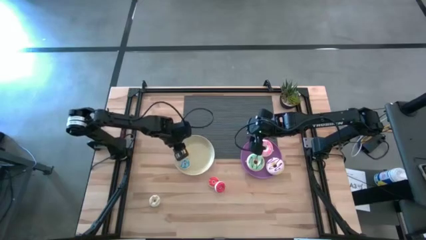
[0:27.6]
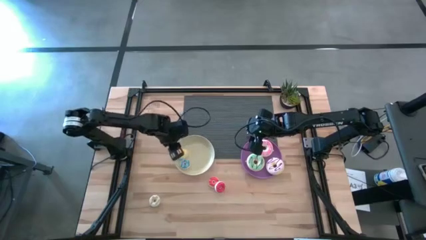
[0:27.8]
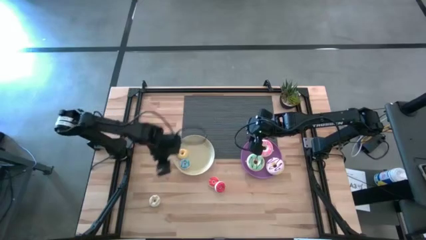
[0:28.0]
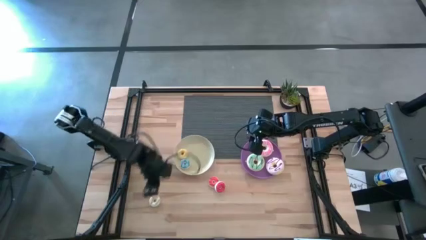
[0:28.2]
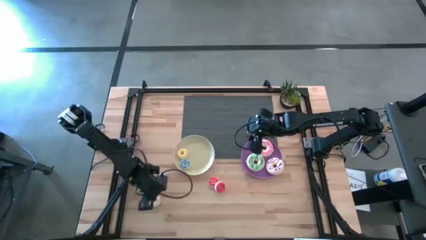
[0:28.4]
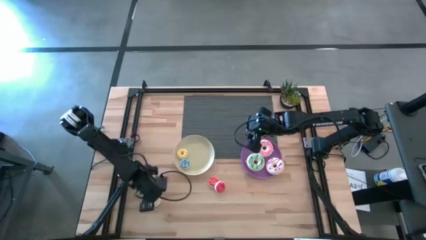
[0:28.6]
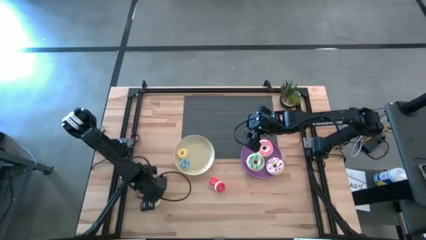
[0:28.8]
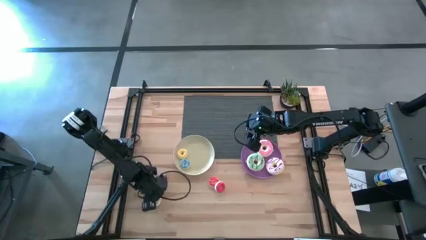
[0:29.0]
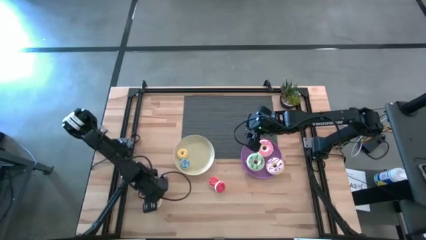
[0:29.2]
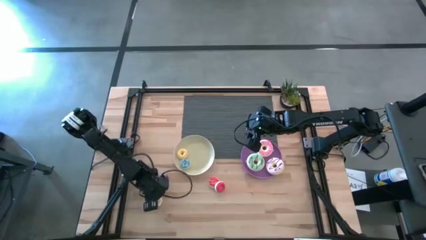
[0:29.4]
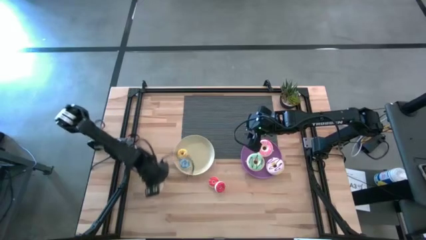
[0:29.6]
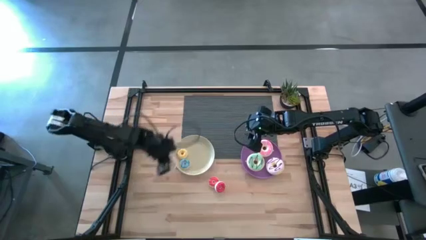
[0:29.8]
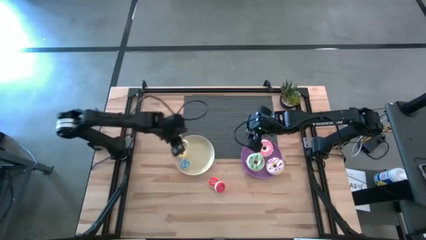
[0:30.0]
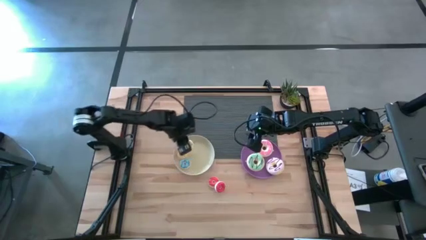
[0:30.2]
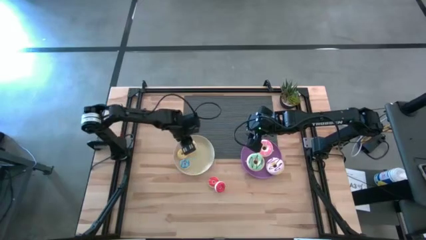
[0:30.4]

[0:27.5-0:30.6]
Task: Pick & Place donuts
Put the small white donut on the white plate

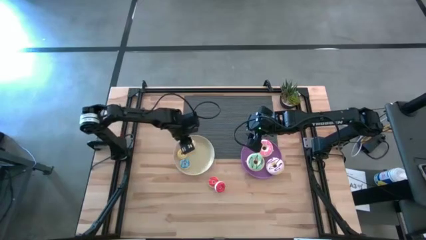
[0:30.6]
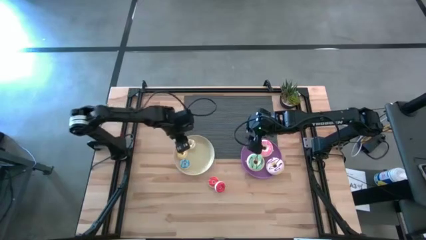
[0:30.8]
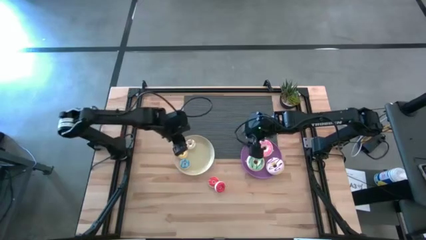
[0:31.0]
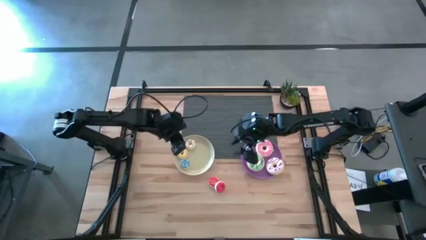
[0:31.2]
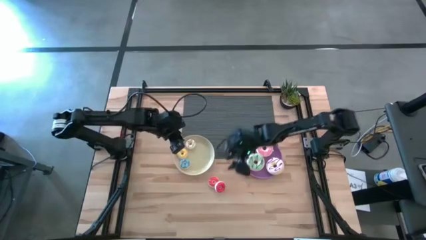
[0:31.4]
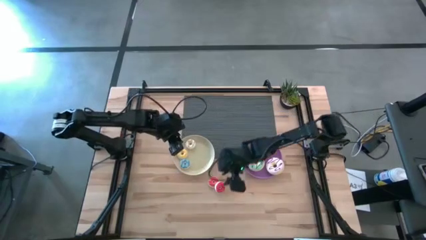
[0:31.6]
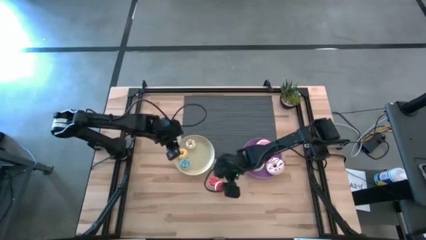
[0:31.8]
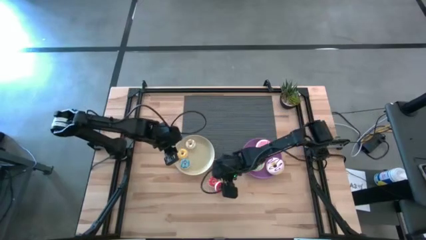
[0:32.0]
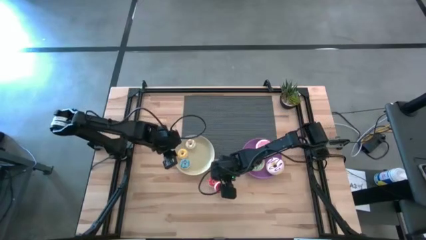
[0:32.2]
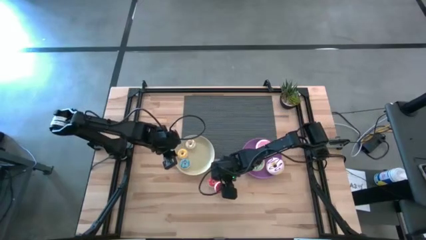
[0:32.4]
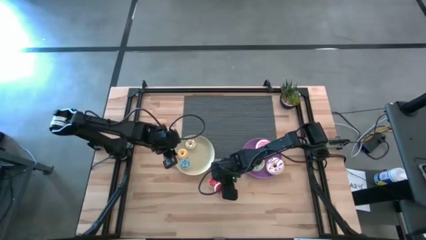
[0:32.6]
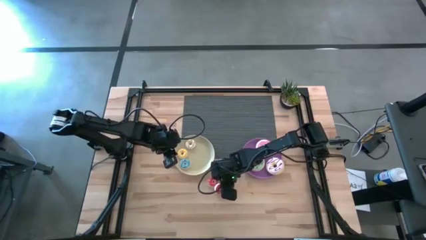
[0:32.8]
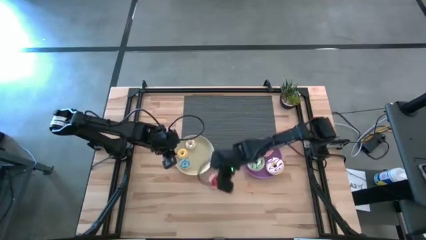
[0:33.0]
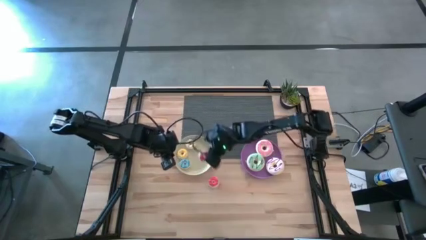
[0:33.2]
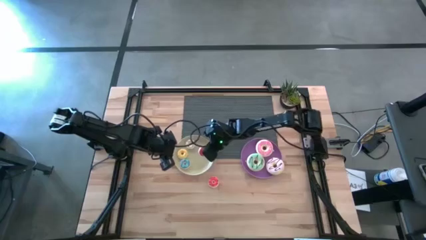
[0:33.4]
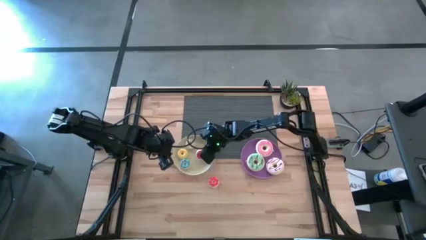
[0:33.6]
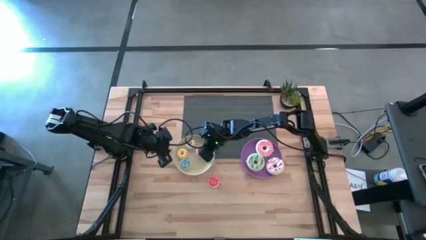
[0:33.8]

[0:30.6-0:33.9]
Put the small red donut on the white plate

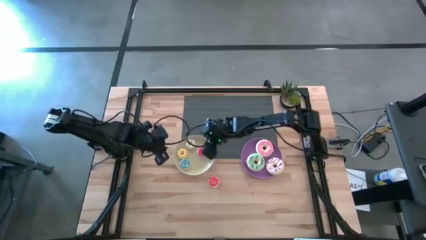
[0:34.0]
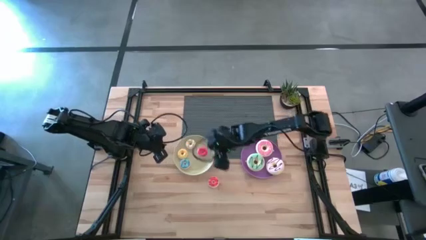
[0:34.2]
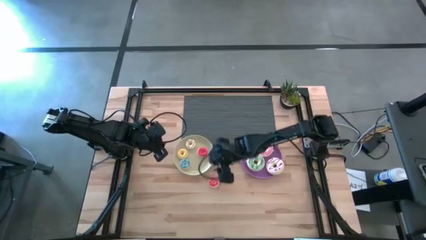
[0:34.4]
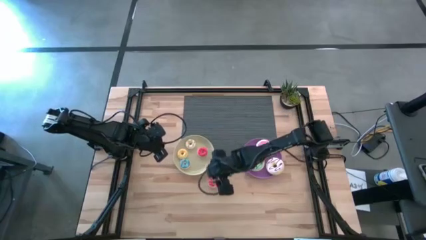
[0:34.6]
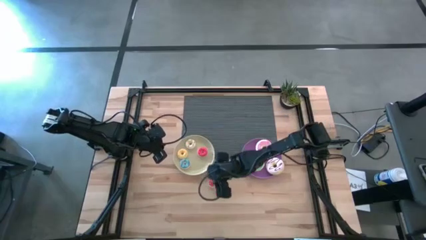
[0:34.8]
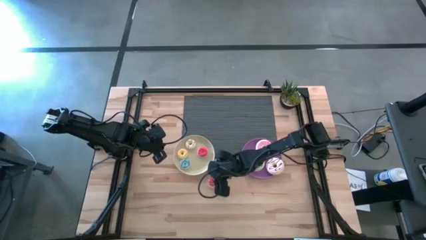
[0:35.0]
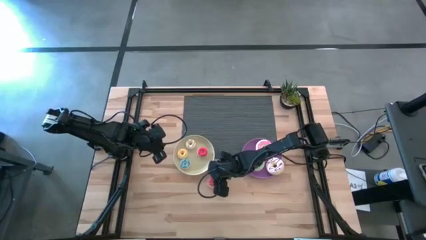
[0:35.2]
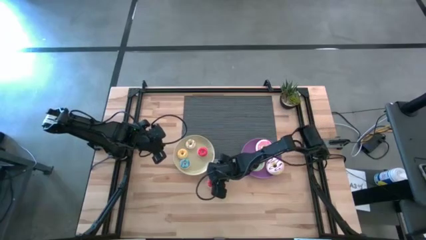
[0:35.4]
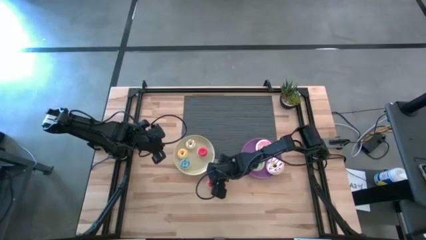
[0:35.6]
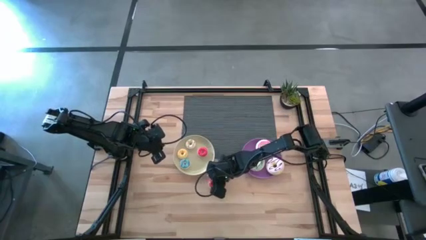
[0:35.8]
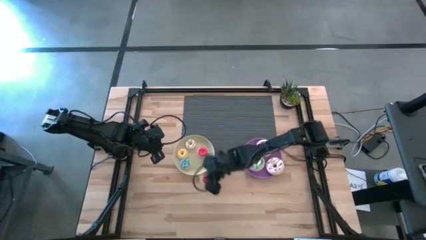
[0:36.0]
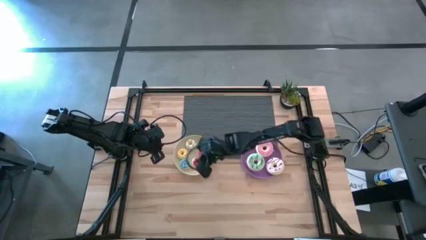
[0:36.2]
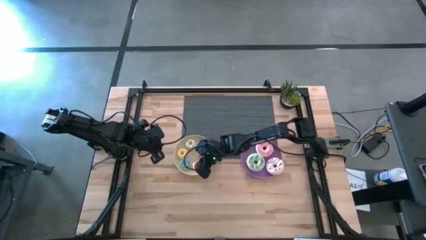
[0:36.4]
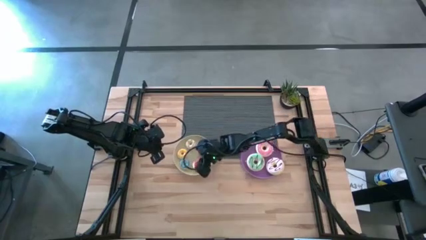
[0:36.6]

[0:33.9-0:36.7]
Put the small orange donut on the white plate

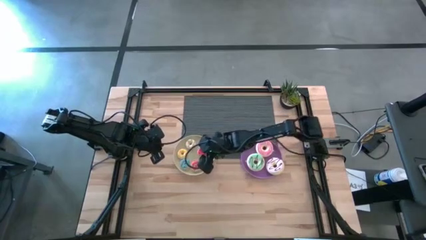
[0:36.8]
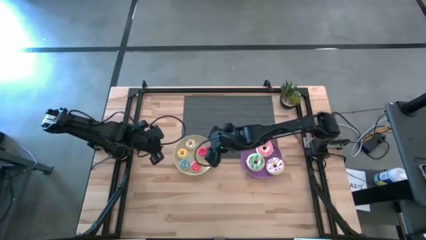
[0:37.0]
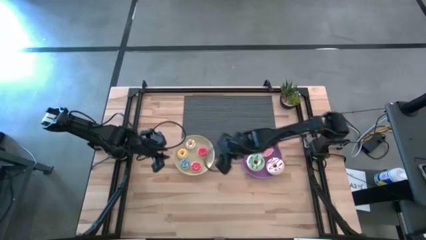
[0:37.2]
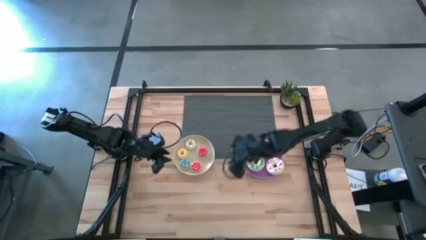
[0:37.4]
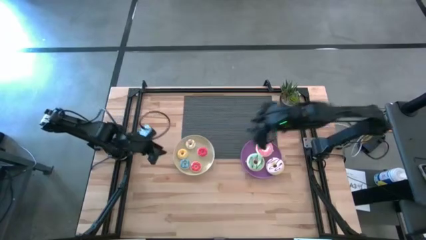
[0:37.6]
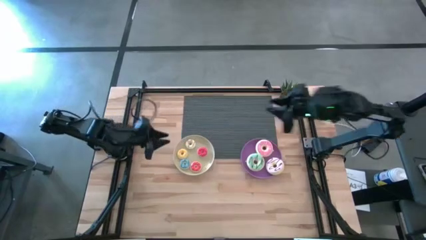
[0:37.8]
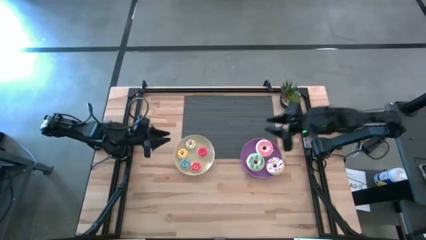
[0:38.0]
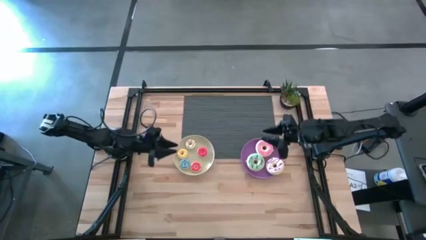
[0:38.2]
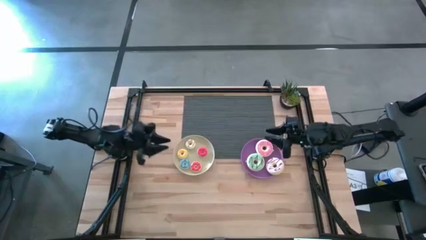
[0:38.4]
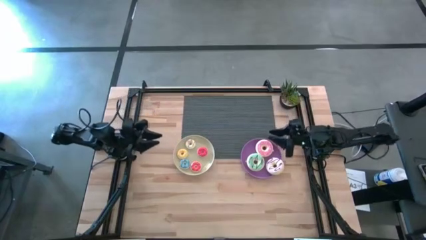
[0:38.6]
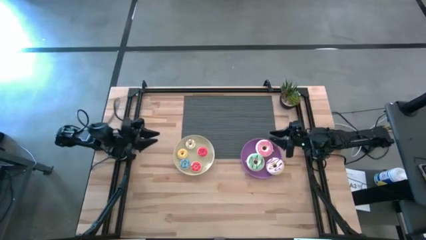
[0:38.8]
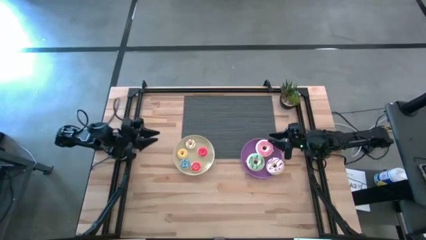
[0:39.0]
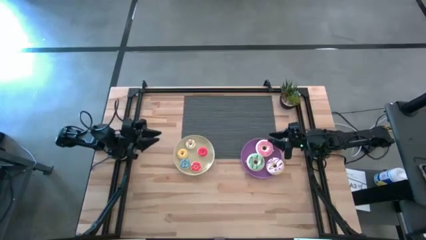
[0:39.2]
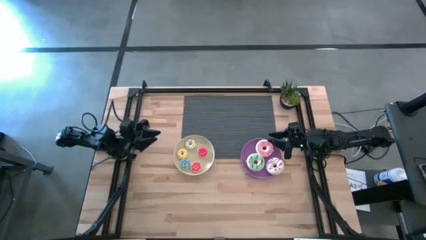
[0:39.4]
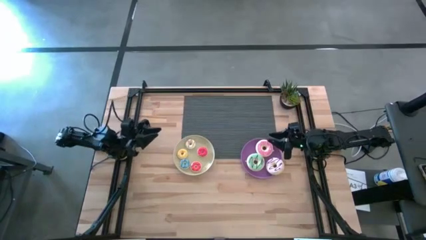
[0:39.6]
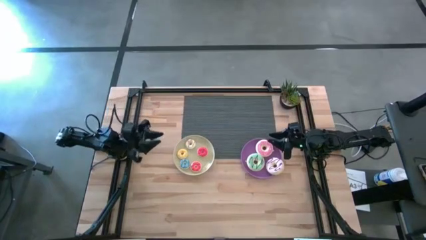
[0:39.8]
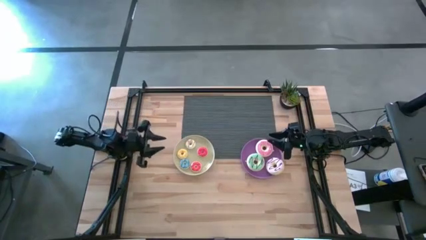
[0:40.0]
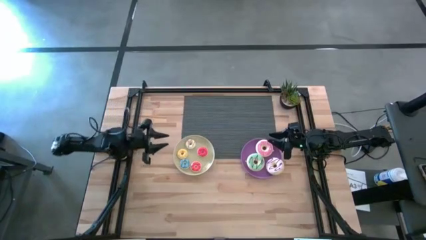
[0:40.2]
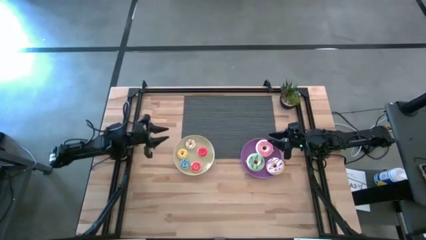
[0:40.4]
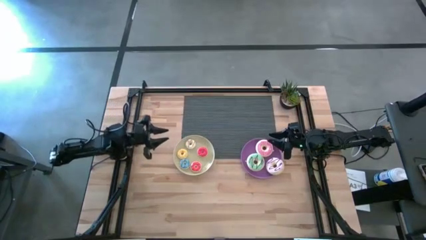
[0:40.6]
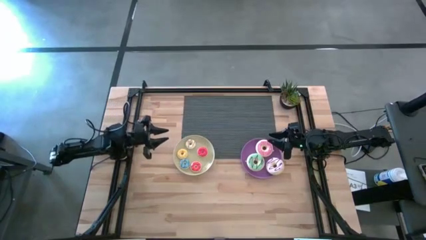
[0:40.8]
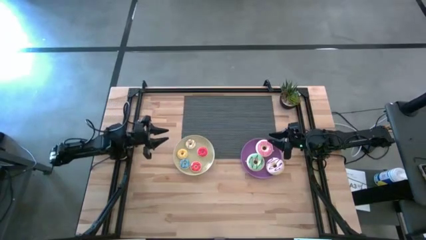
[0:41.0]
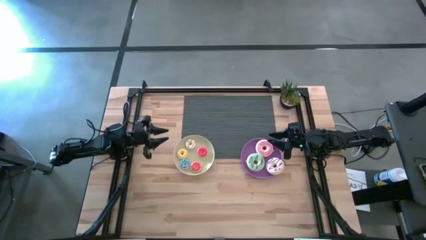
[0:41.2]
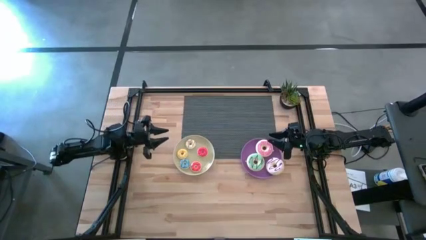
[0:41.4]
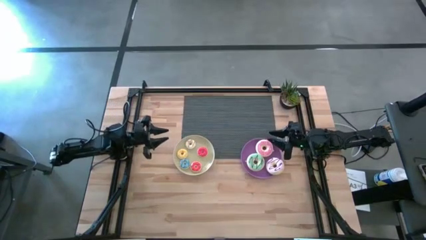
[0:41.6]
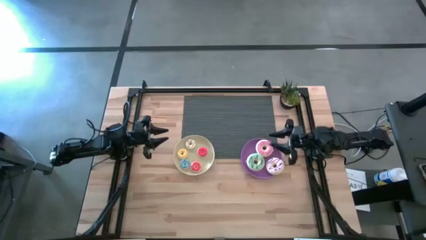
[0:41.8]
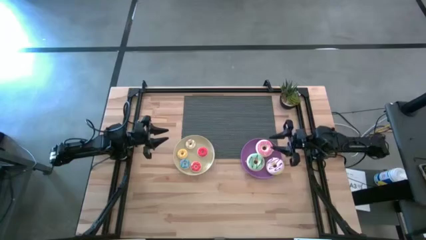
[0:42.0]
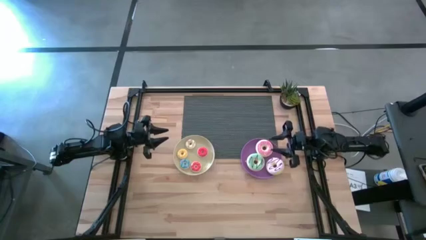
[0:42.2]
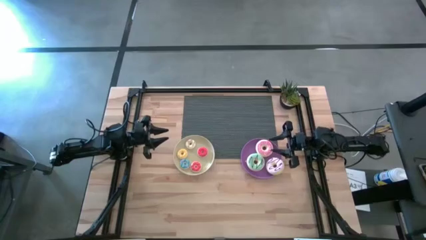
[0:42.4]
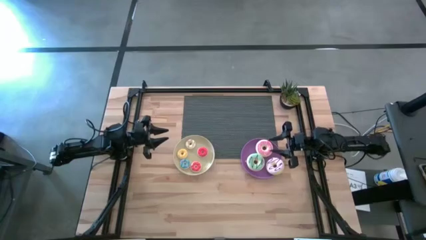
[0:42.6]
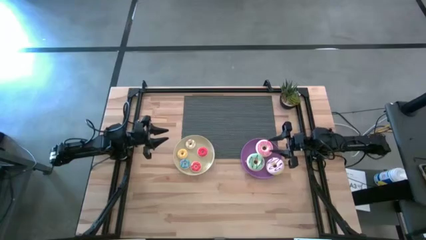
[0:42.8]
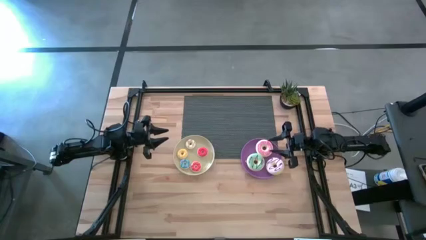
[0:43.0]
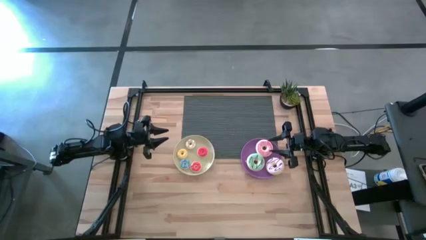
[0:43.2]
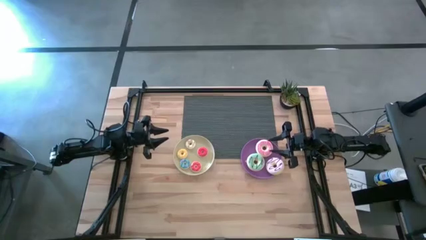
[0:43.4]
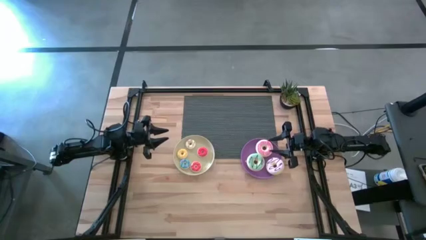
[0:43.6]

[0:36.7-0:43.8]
Return to Home Position

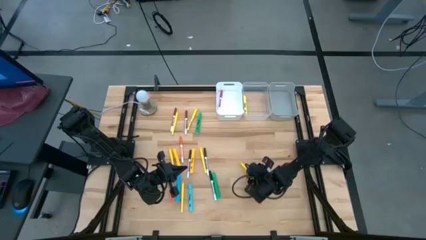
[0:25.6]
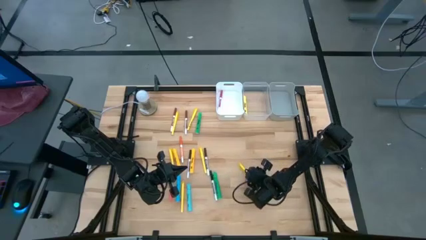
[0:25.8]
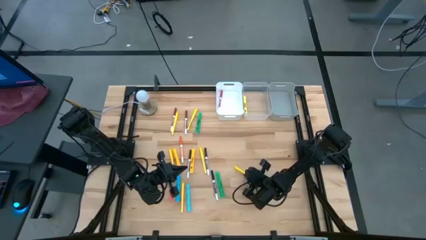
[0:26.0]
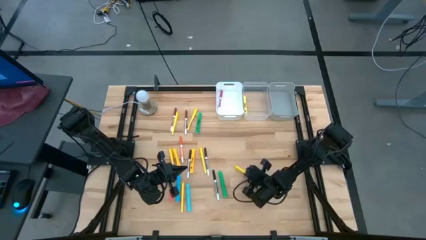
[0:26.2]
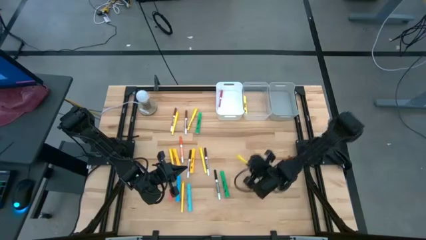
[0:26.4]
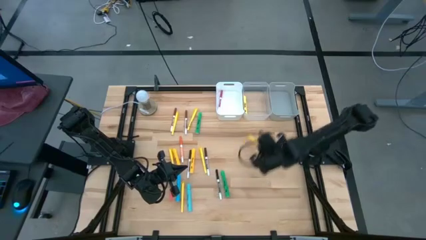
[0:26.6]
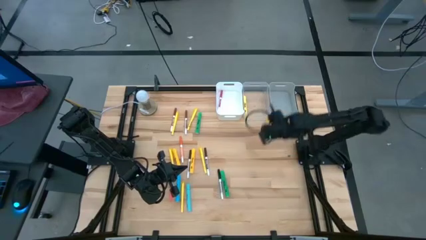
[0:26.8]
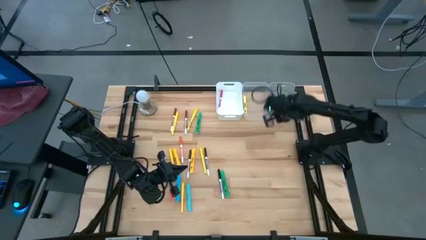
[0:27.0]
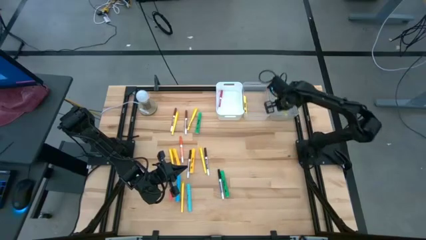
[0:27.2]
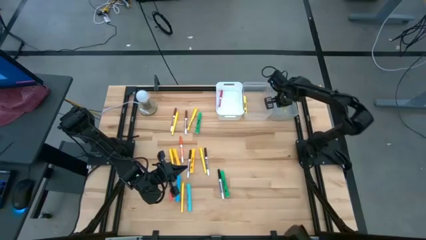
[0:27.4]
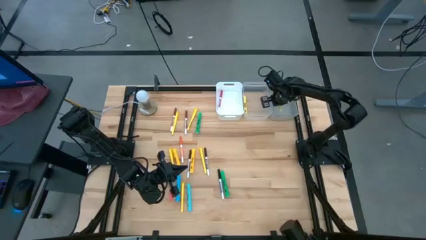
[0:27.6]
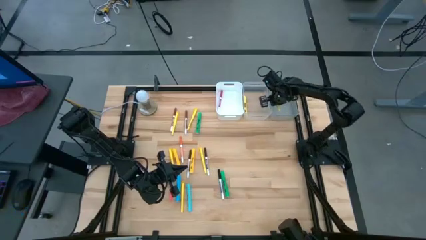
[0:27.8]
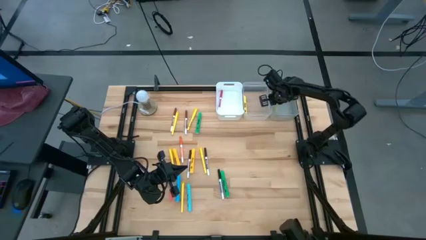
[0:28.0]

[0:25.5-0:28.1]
Task: Pick & Place Markers
Put the yellow pen into the gray bin
